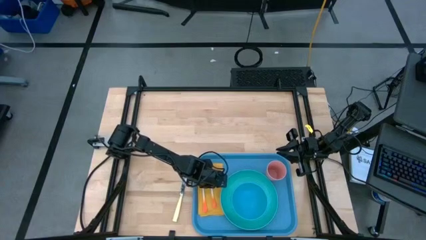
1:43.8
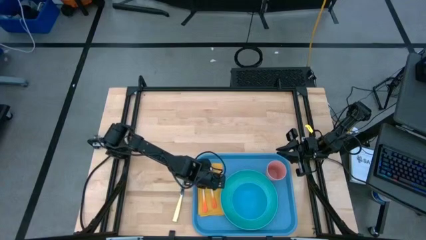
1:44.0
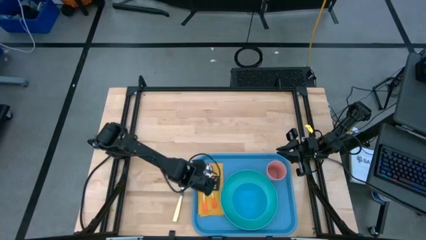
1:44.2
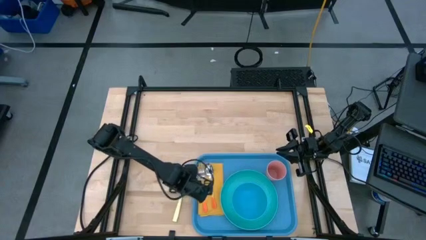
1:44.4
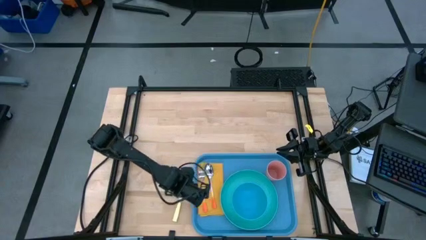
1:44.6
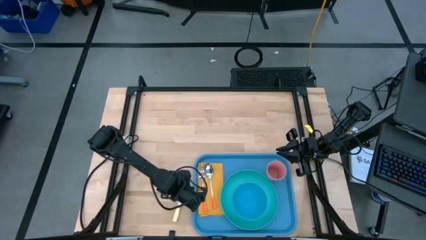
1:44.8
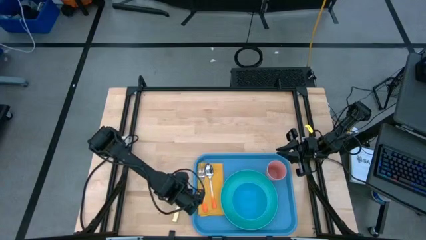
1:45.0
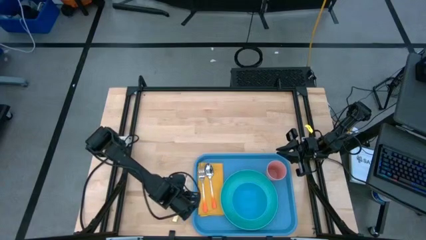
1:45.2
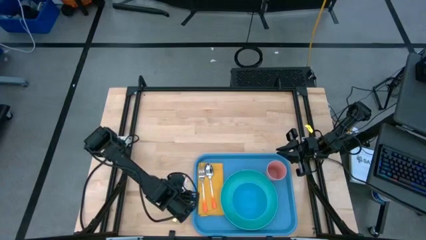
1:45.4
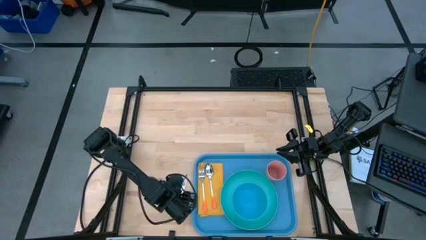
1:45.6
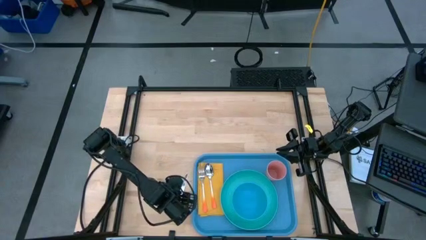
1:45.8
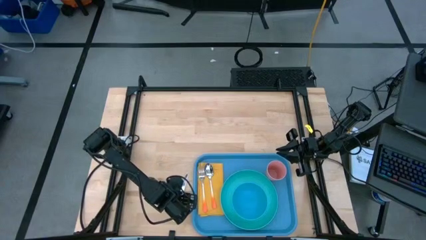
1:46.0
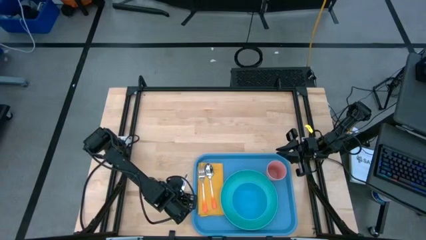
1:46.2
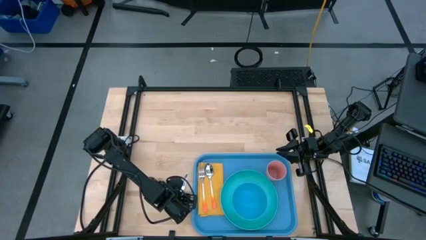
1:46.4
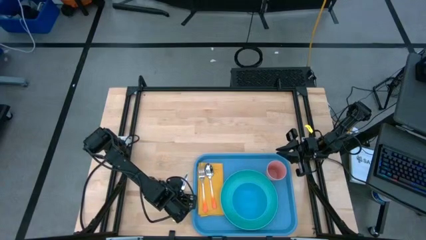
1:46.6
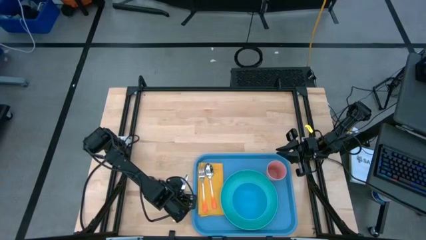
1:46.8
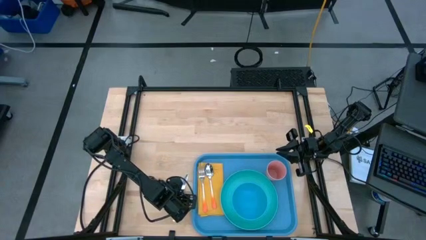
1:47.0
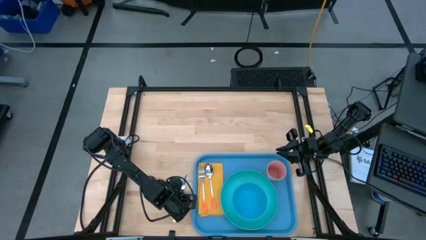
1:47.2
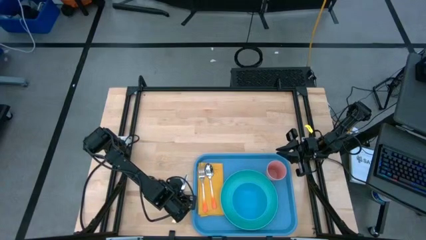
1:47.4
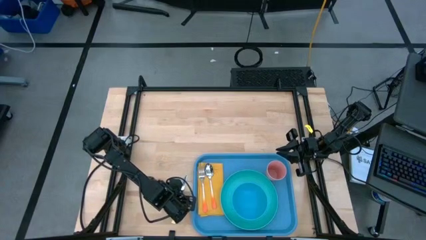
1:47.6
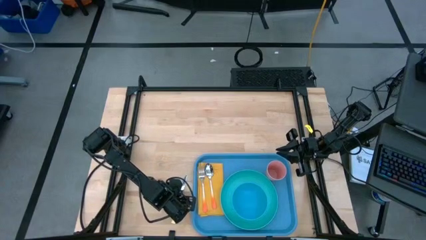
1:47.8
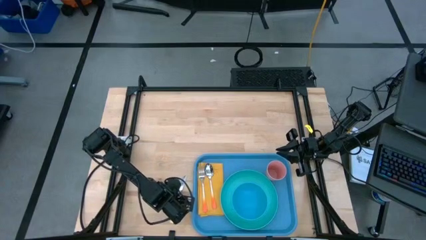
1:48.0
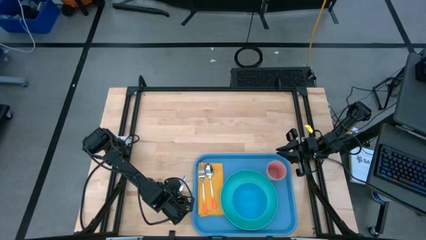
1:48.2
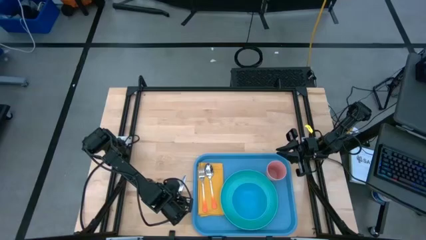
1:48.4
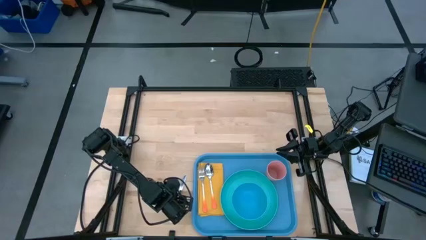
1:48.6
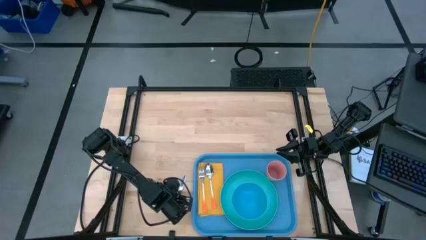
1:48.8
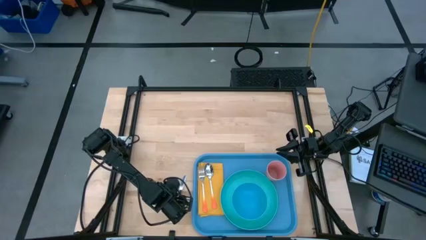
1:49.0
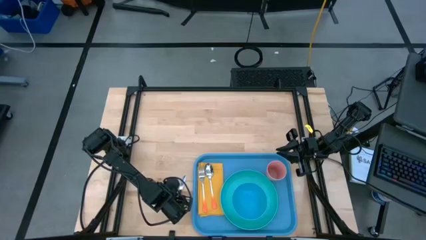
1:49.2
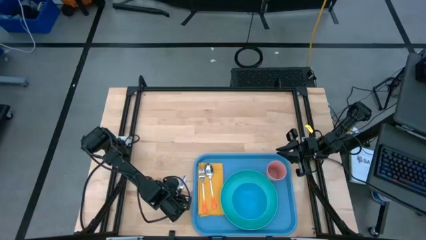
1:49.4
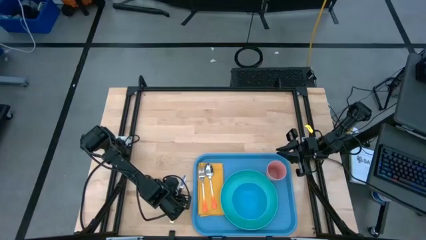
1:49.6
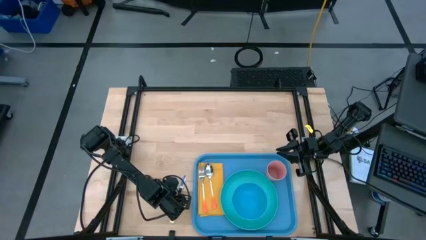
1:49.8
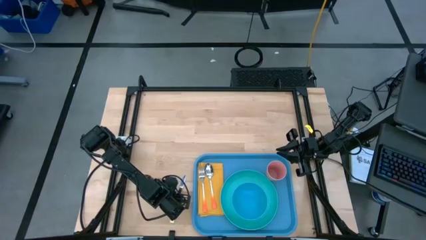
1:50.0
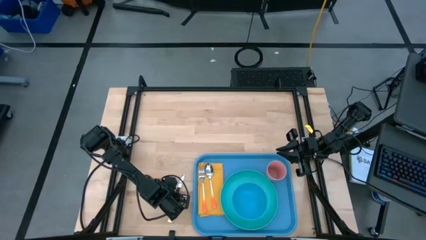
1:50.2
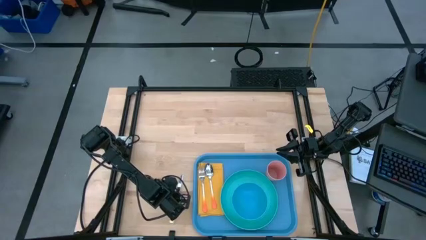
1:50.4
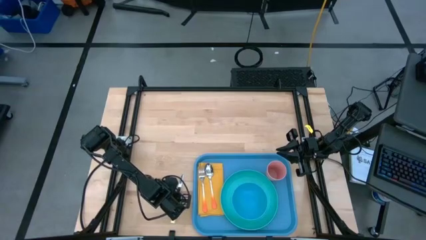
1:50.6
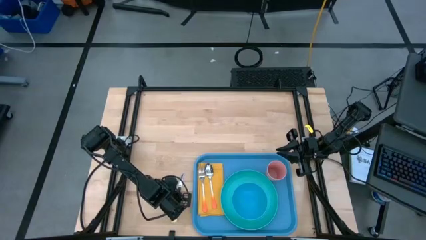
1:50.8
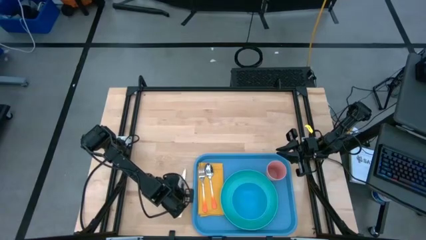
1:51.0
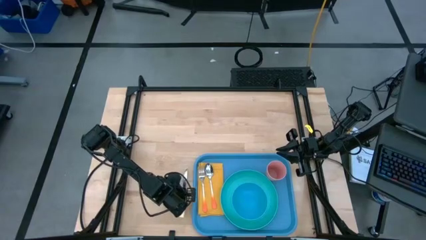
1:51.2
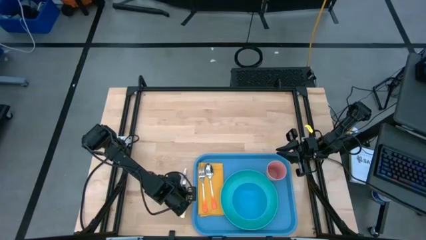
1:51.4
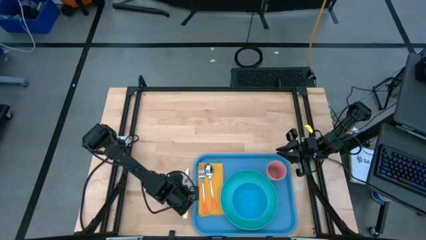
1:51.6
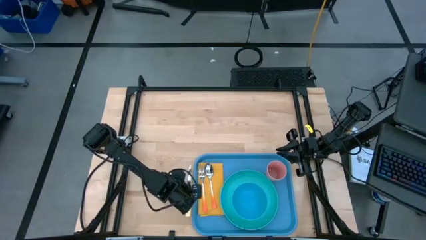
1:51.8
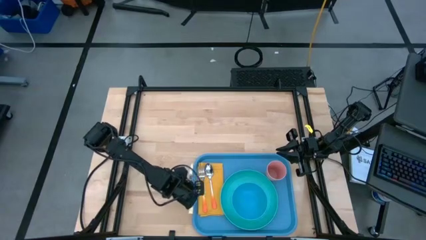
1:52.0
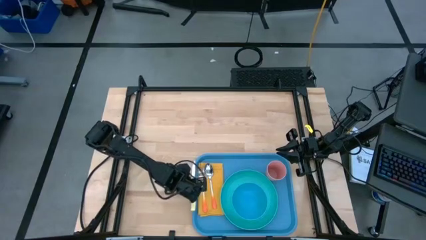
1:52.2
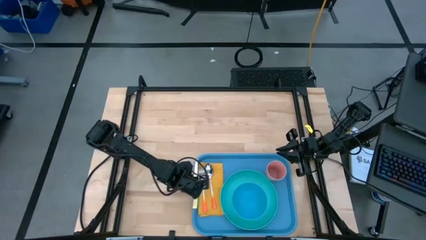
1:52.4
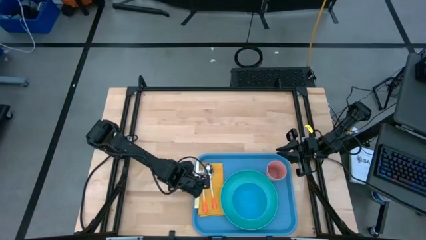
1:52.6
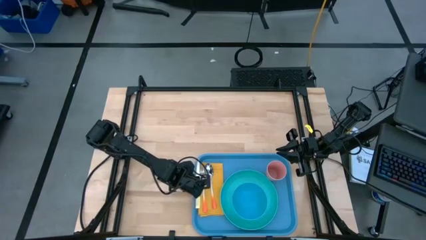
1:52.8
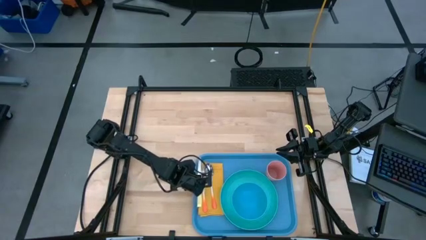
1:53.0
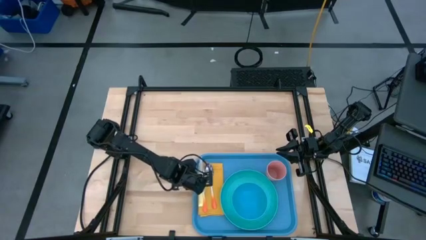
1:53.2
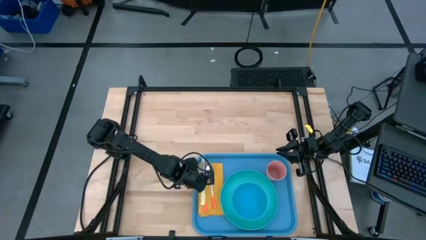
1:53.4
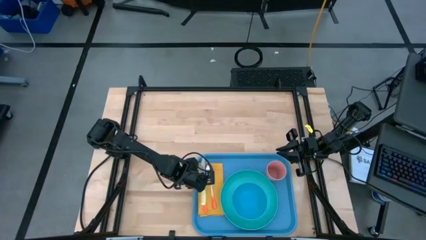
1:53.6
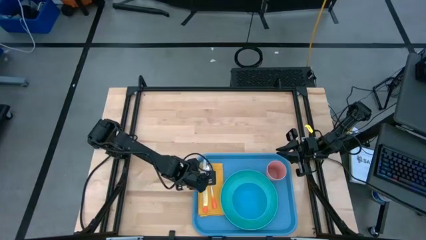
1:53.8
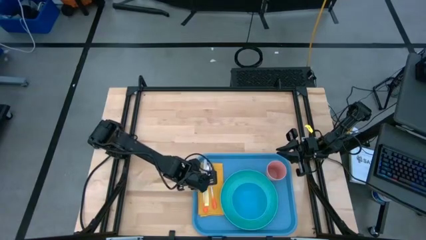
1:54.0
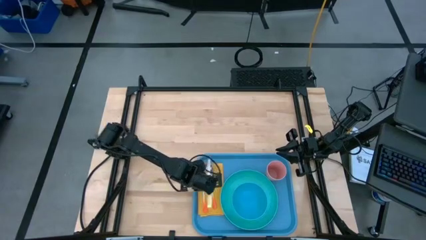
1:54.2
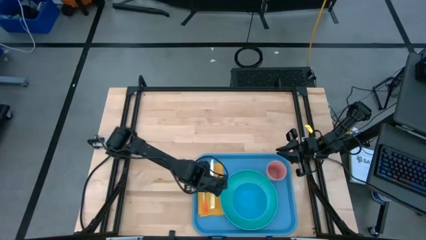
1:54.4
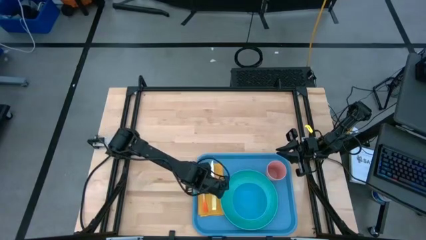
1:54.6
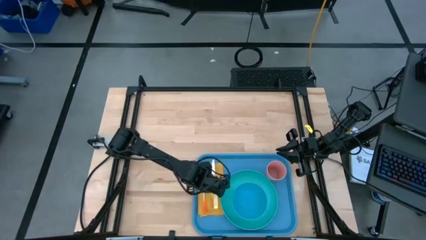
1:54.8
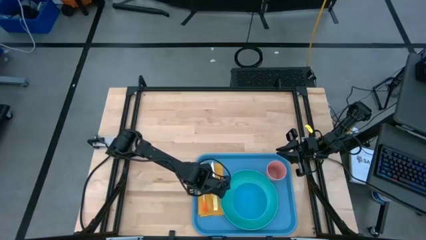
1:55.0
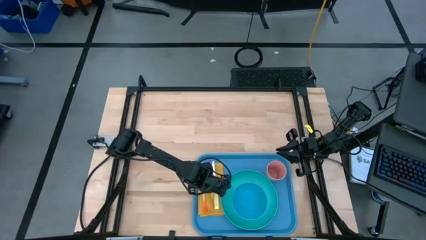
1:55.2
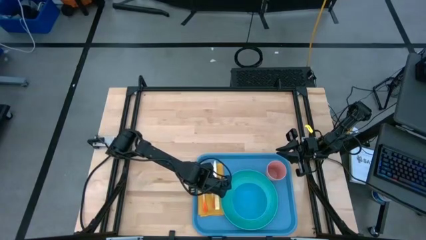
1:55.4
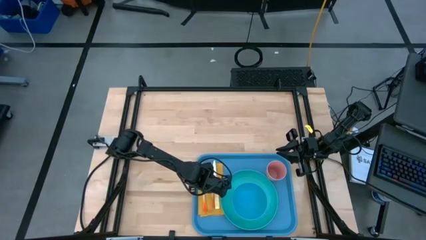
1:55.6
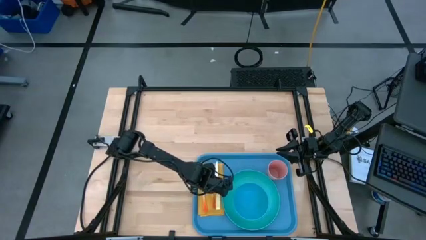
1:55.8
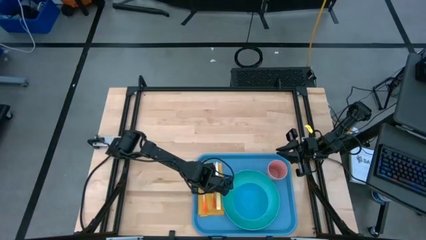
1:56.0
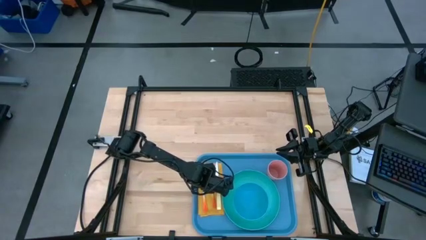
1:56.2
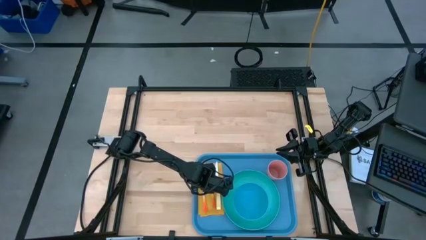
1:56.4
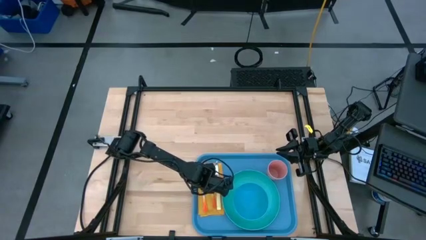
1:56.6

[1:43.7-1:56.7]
Task: Set up tray
Put the yellow table knife on top of the yellow table napkin to the right of the orange spoon

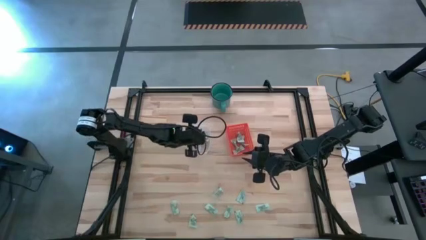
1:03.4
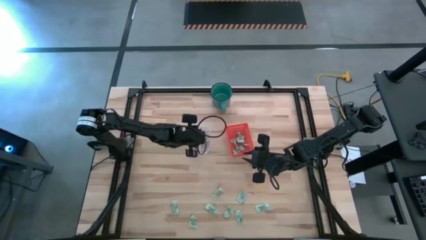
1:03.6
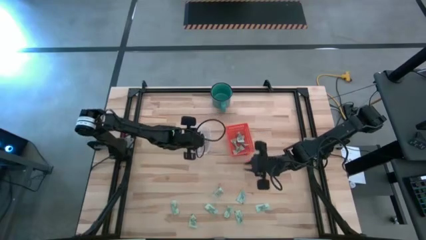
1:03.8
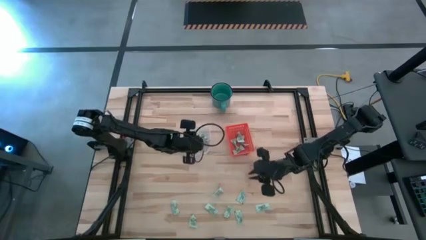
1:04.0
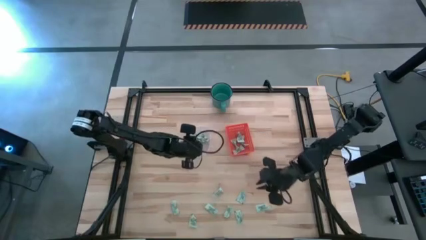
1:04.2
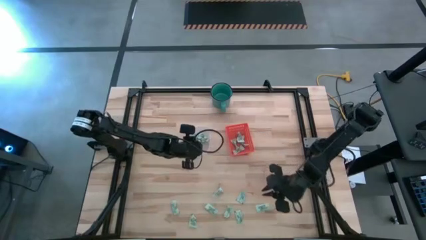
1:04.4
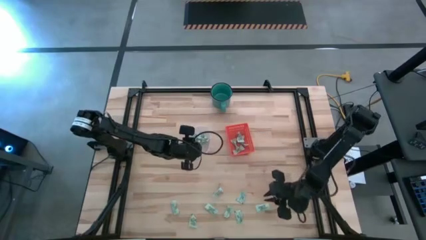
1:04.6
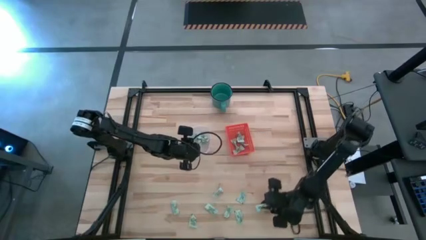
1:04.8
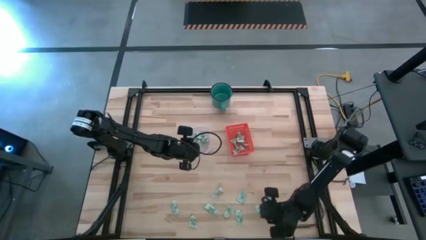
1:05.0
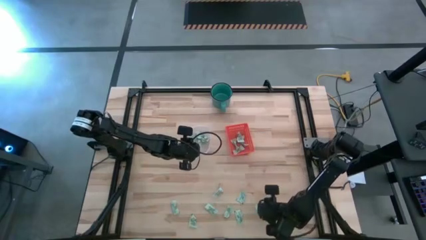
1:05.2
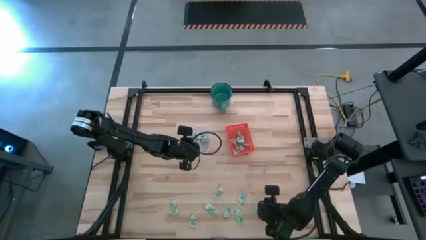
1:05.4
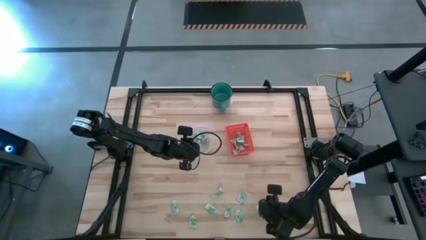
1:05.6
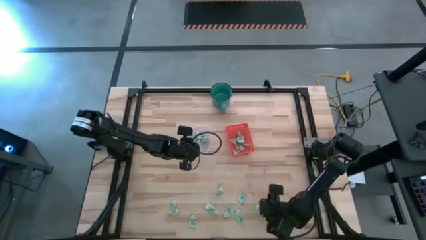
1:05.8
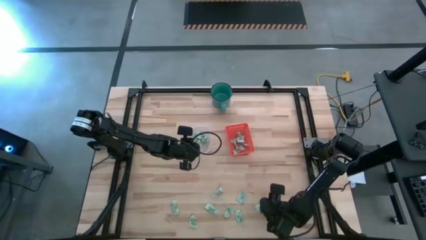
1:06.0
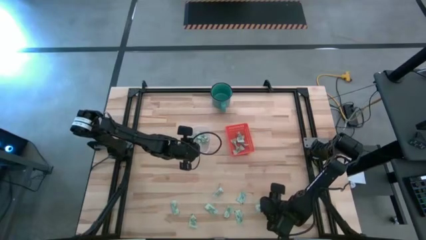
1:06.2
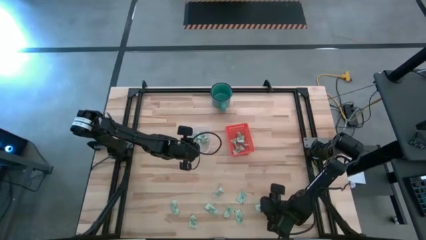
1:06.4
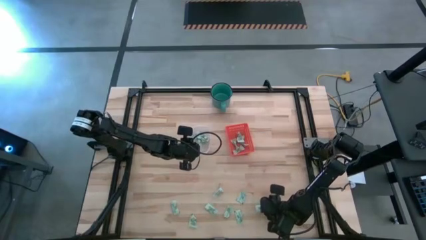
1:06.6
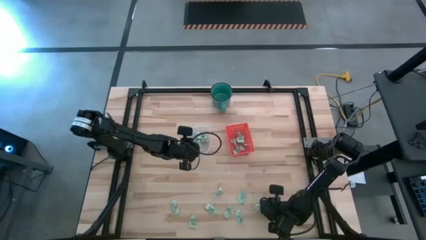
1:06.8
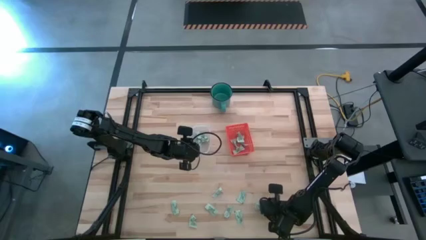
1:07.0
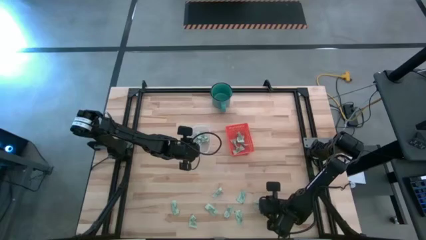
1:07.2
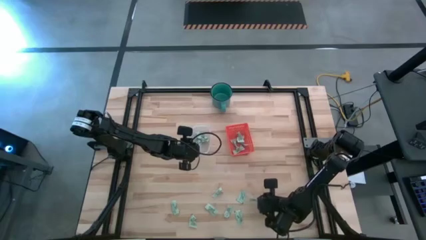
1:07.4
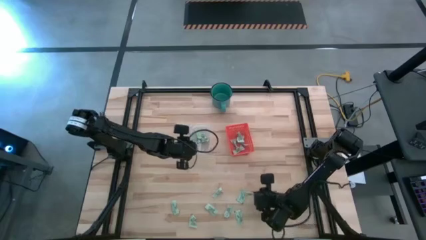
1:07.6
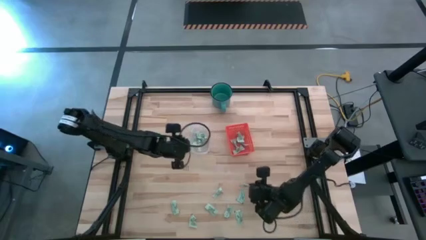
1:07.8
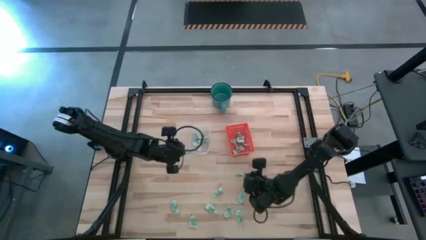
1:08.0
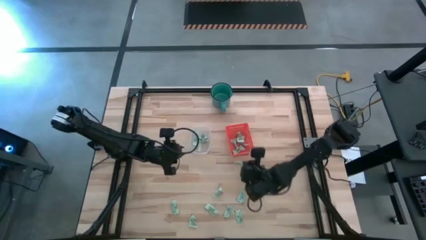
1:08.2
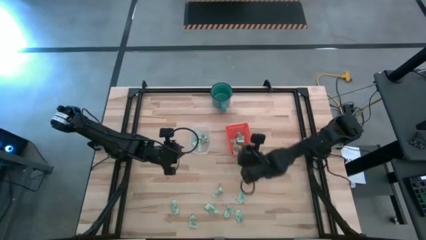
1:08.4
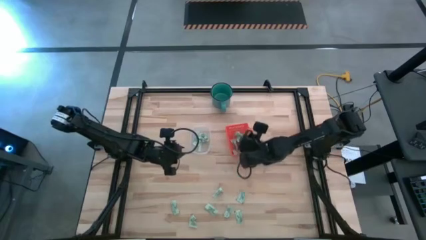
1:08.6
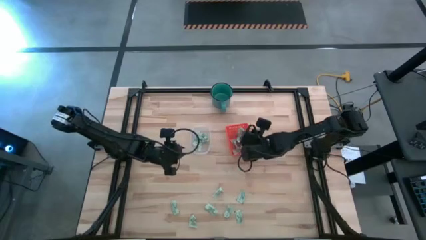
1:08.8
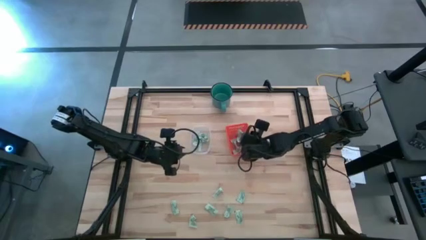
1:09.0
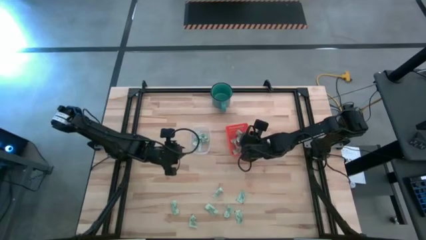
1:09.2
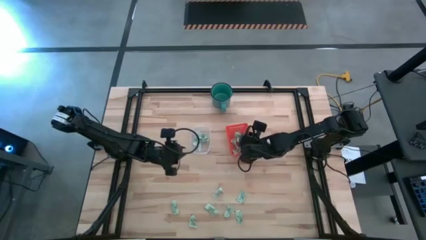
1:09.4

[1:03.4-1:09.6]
Task: Pick and place items into bin
Put the stevia packet into the orange bin
